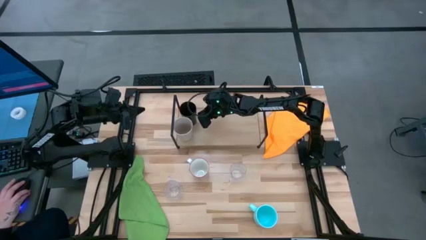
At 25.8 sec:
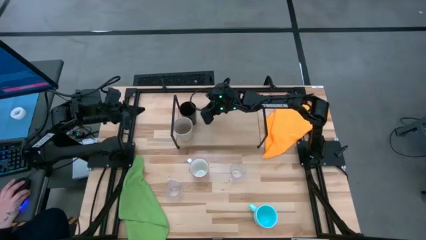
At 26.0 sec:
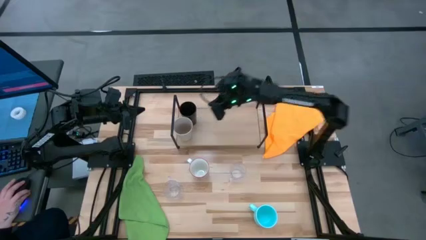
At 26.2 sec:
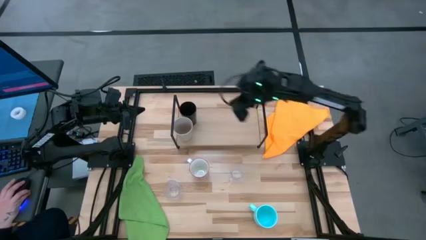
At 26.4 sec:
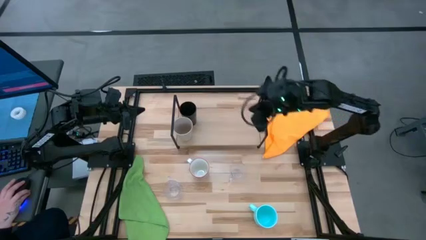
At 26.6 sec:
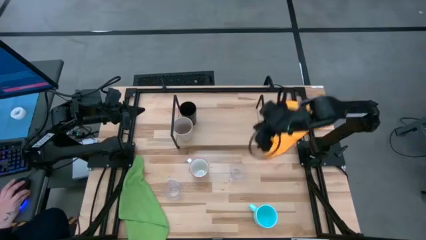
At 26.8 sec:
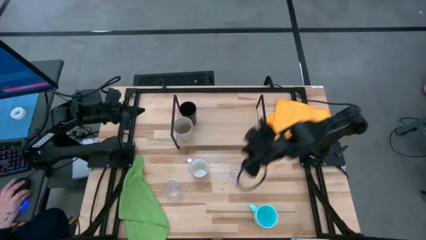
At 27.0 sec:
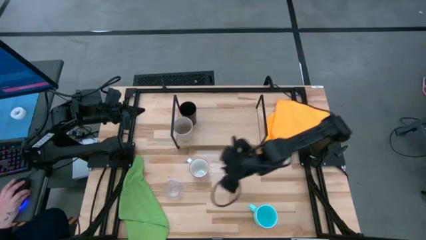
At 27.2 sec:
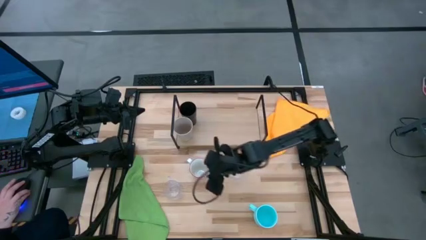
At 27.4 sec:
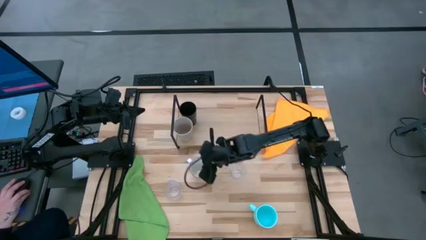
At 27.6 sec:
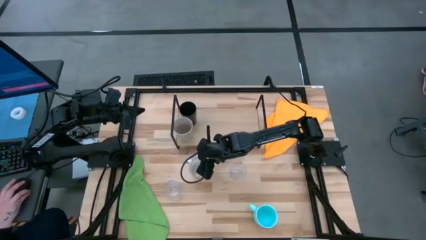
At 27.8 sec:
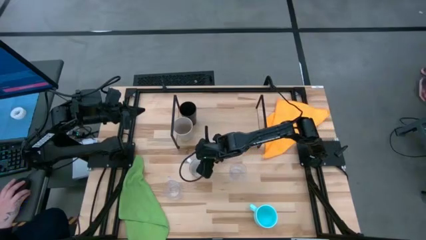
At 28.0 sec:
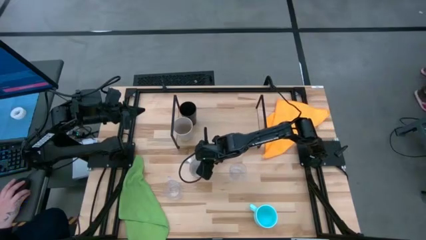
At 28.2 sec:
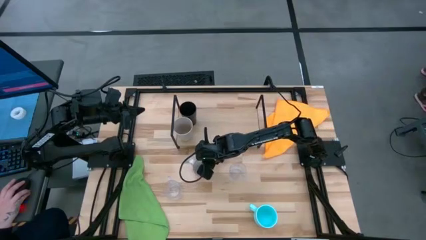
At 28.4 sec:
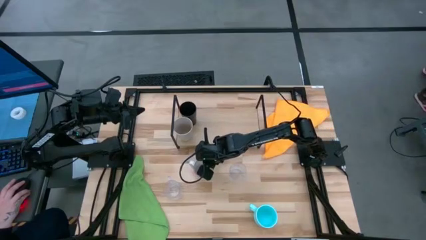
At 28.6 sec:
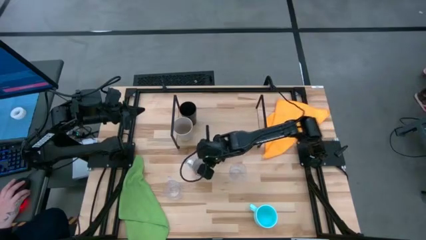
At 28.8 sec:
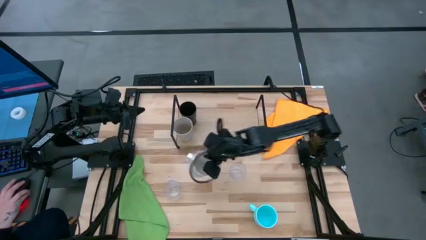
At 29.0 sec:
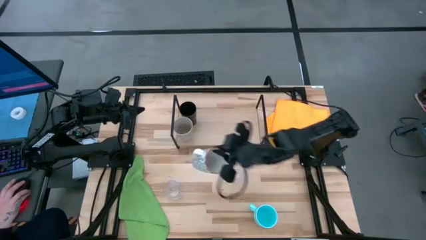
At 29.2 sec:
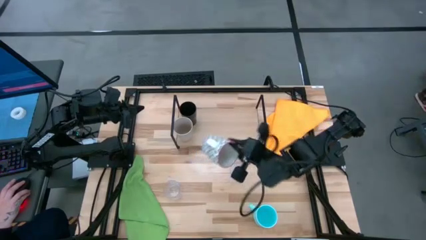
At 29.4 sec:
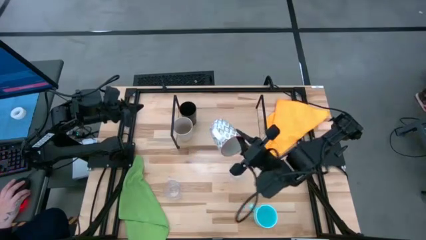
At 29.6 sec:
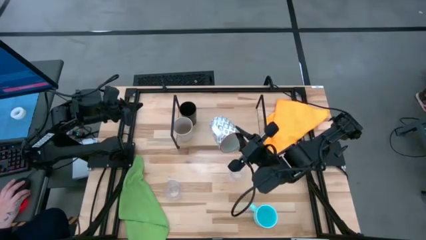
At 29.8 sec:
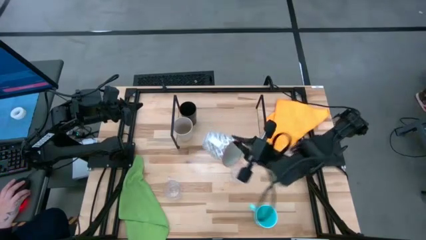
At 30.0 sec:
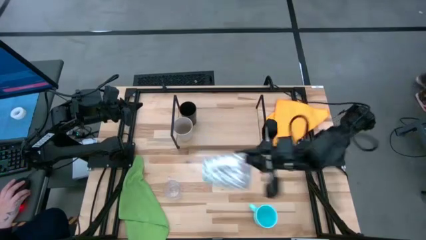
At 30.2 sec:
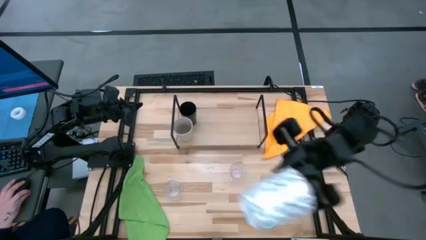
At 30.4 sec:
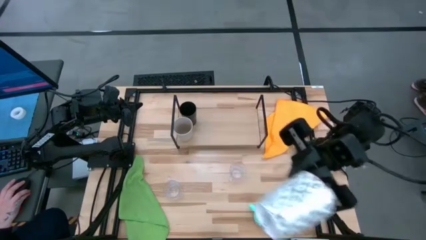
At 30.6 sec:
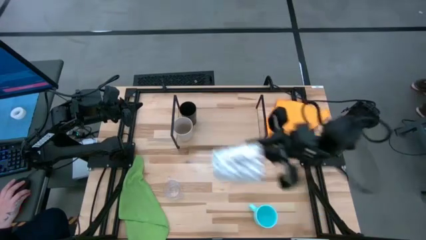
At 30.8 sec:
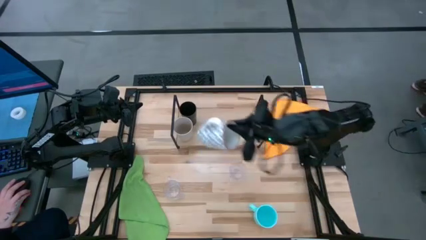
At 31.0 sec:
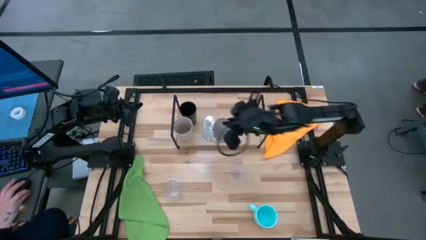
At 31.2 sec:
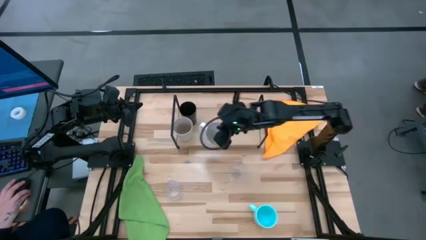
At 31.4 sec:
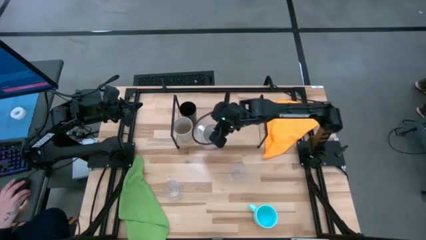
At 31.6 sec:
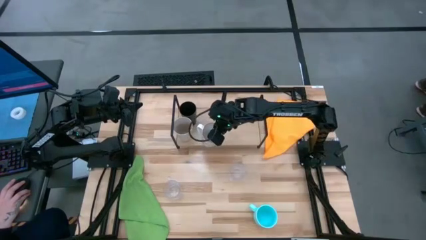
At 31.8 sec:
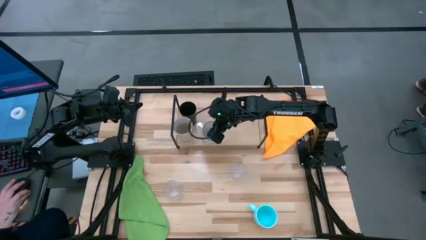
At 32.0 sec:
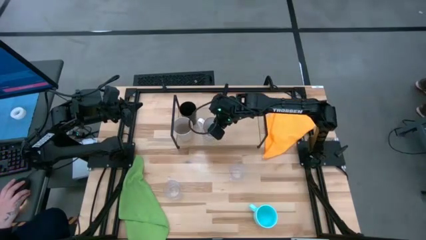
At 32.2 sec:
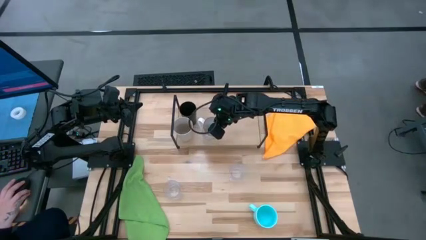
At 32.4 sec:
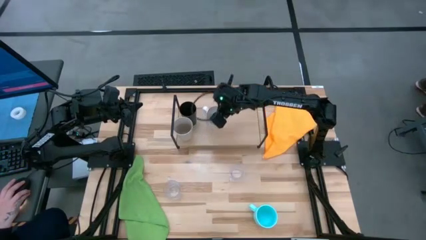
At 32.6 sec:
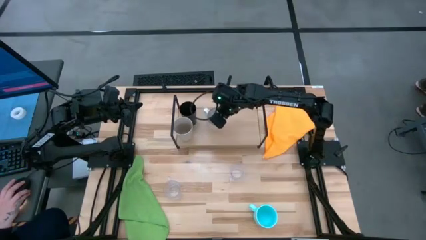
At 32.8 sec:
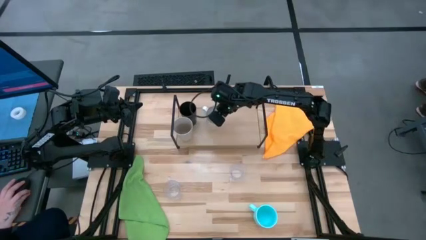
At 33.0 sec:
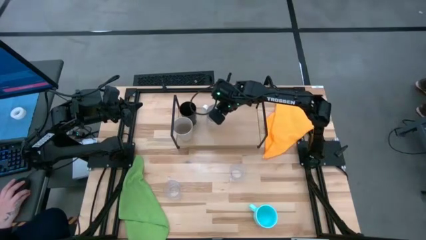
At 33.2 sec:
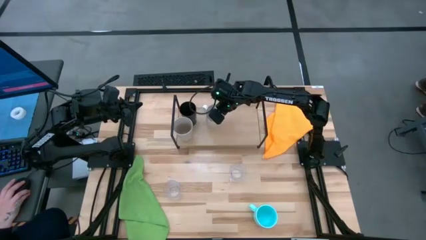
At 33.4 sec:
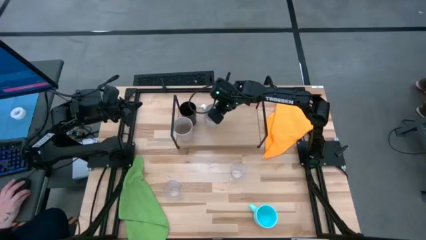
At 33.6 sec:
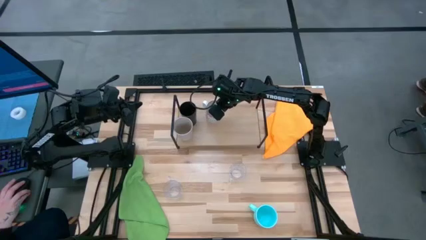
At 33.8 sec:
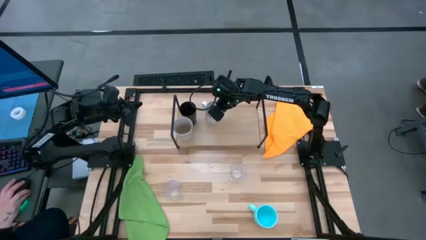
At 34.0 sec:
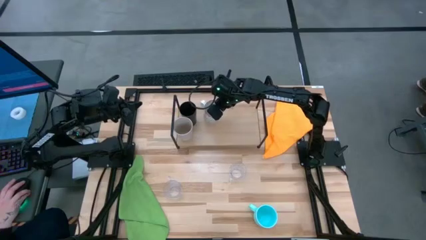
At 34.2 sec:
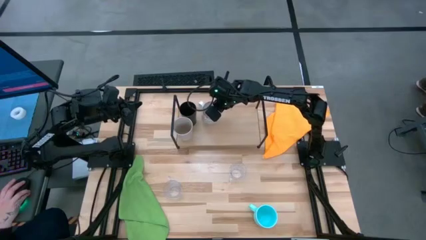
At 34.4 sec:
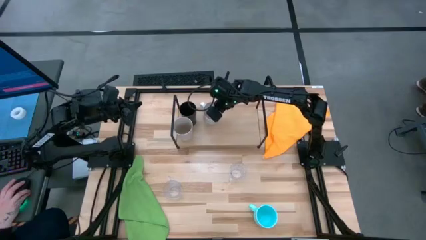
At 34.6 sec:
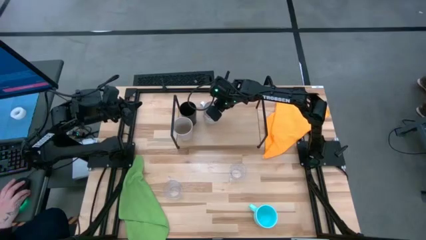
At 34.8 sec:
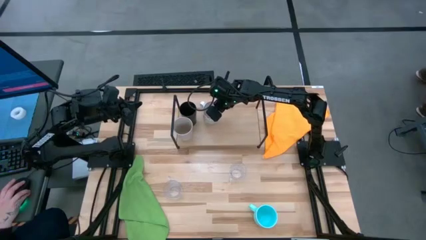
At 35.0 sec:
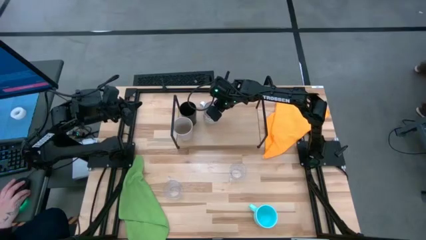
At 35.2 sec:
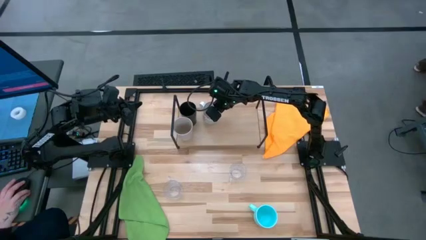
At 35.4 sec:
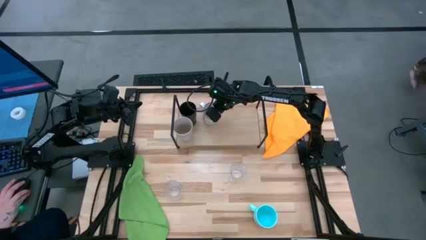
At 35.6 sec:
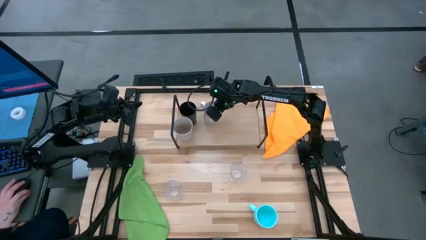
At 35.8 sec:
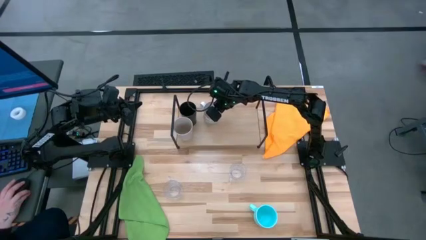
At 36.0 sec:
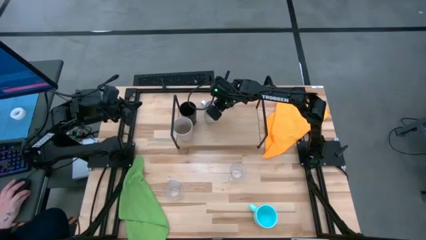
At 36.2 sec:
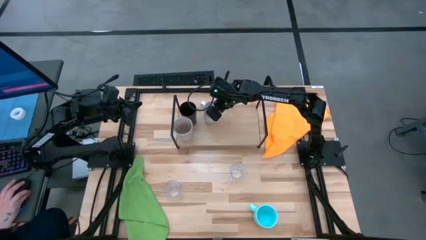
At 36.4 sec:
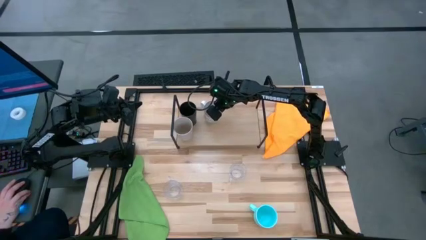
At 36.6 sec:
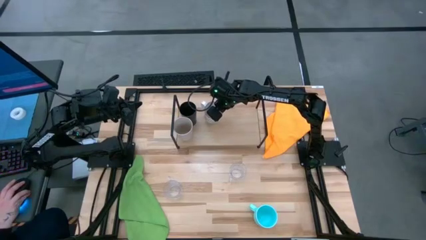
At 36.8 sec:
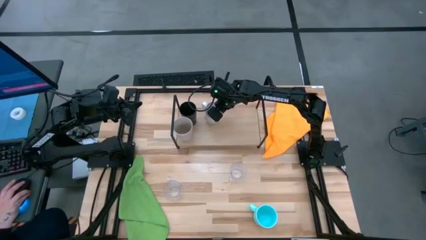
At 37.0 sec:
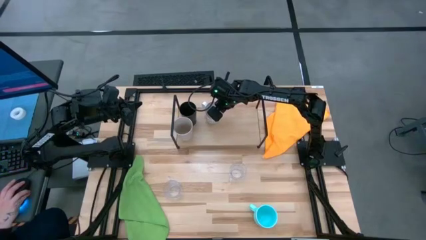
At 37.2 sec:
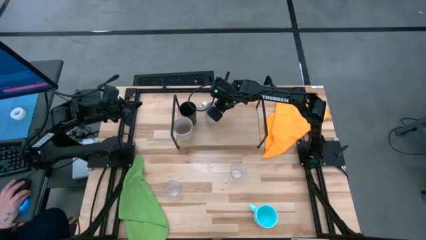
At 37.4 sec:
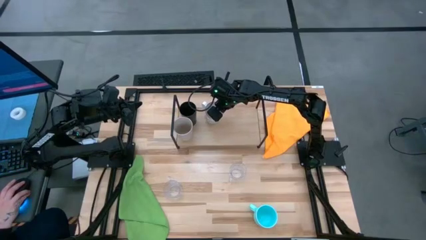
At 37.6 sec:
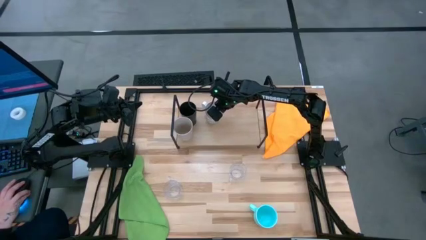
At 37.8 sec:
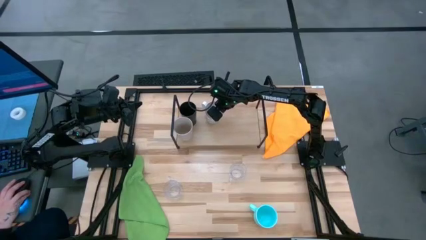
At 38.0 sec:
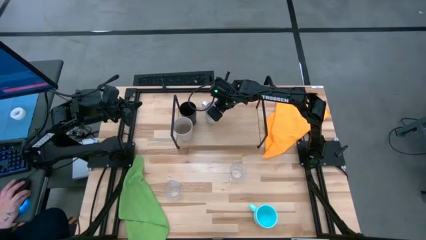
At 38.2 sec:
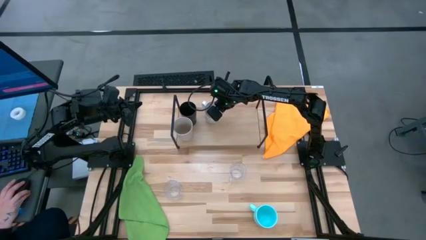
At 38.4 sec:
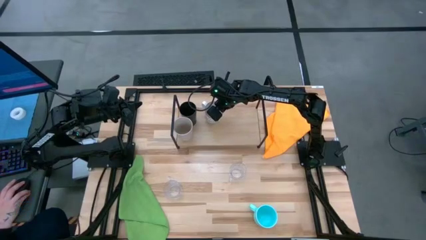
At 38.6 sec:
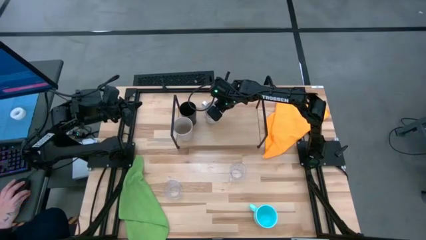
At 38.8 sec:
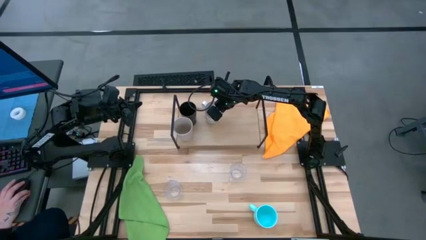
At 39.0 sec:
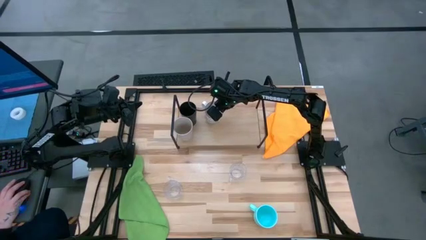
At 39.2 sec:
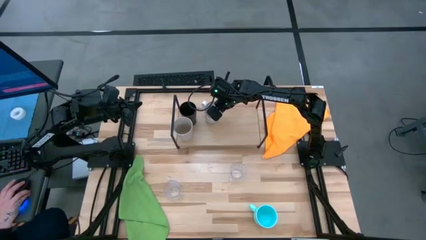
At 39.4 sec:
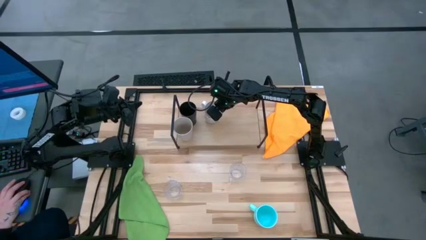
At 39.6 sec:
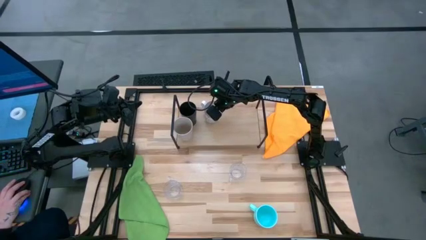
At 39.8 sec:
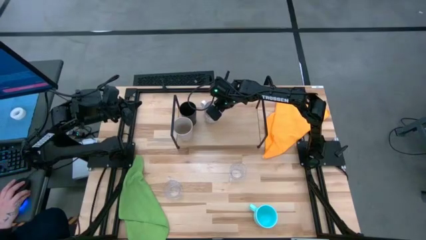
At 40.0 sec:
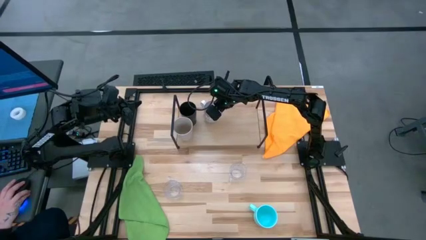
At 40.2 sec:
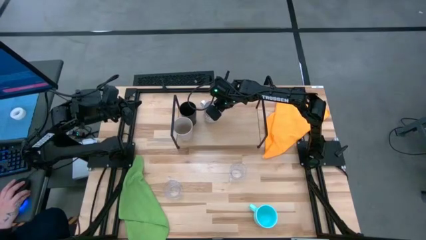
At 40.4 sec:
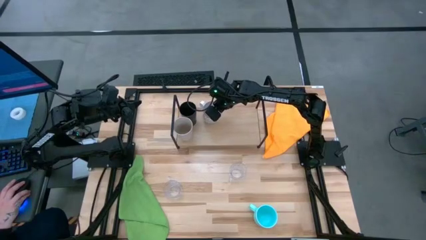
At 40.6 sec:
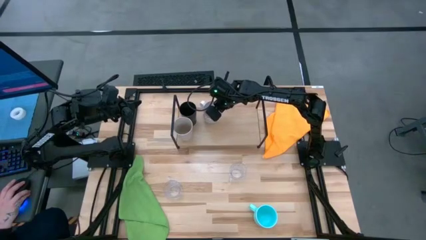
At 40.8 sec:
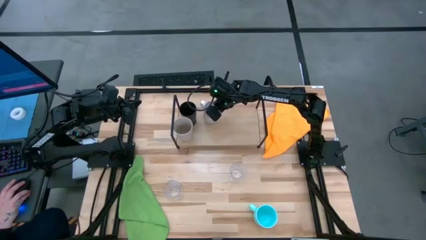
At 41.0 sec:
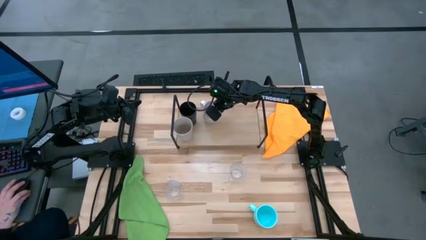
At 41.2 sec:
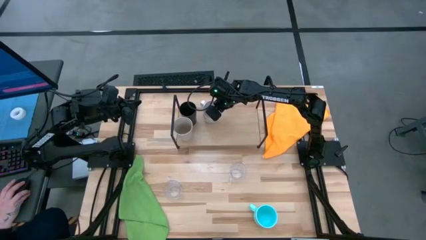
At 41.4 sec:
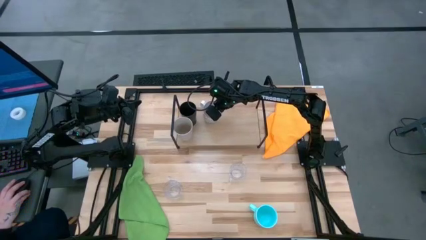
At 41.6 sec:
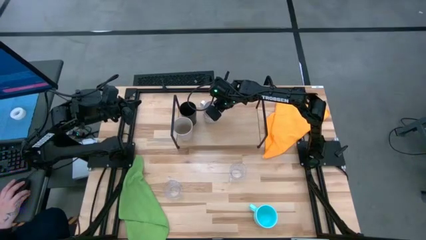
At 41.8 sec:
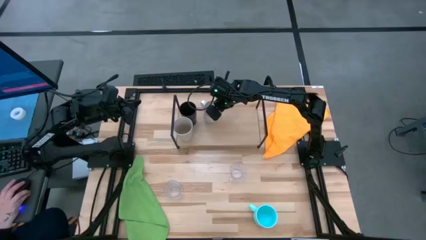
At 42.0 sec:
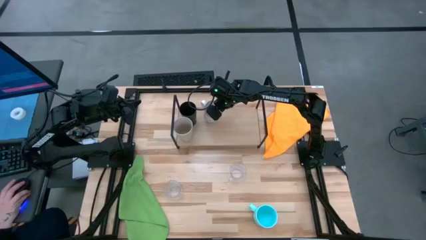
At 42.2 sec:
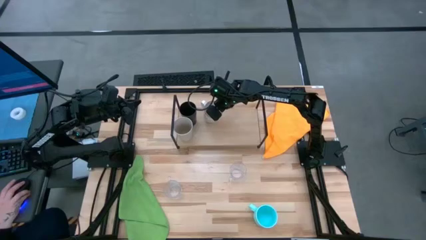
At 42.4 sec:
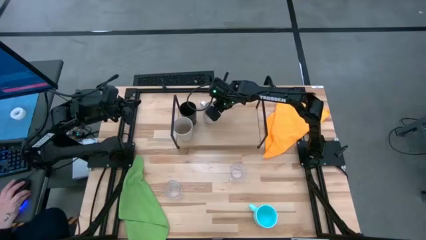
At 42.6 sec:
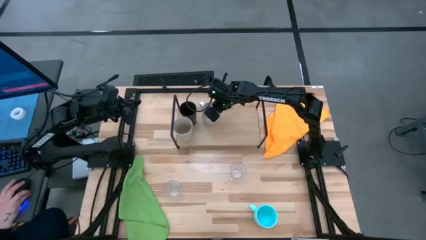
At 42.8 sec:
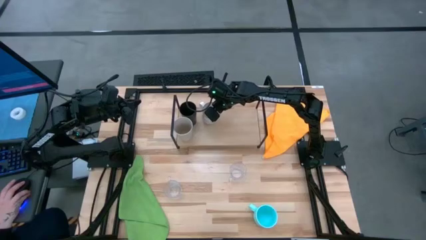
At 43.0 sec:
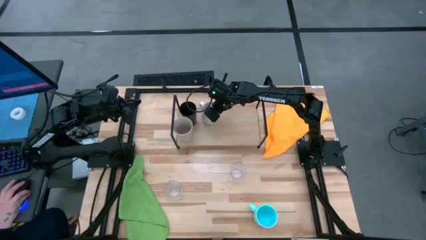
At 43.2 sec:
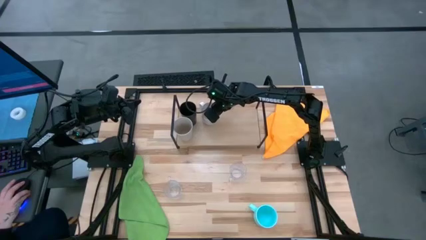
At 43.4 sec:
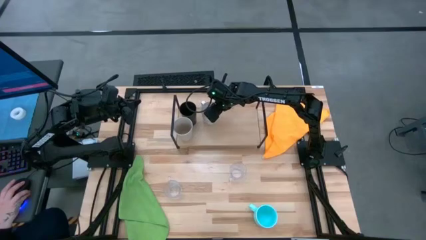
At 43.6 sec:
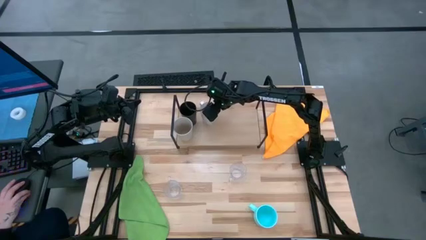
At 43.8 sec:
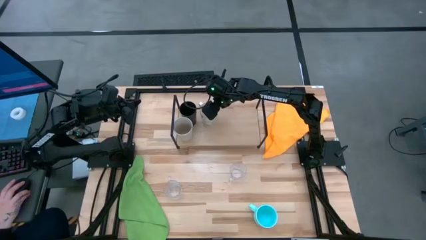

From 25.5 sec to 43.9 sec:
Task: Stack small to large cups/mugs on shelf
Put the gray mug on the shelf
